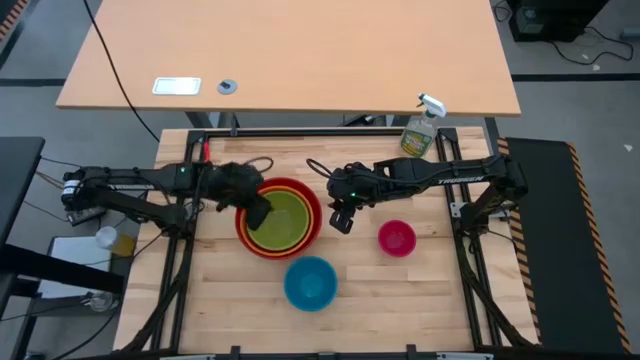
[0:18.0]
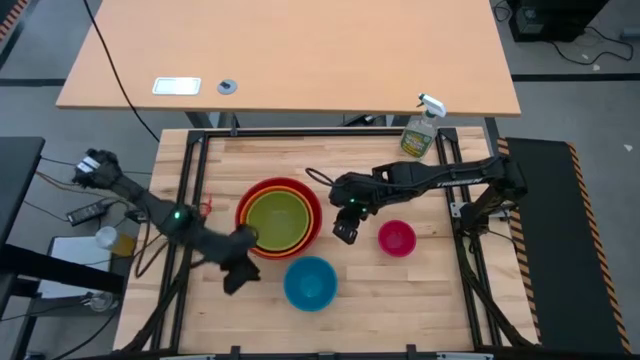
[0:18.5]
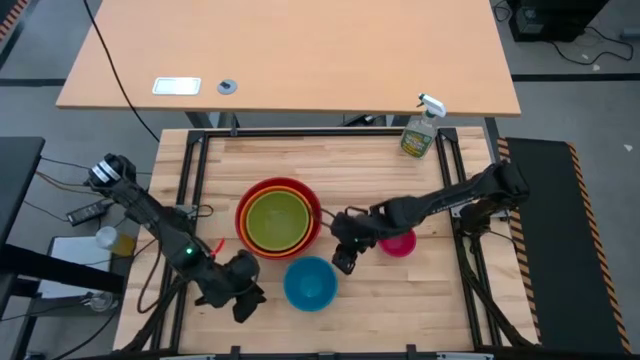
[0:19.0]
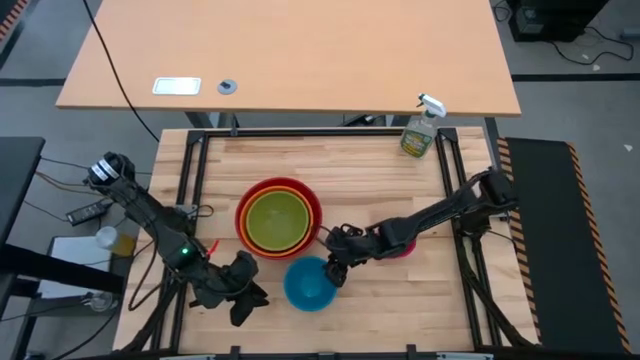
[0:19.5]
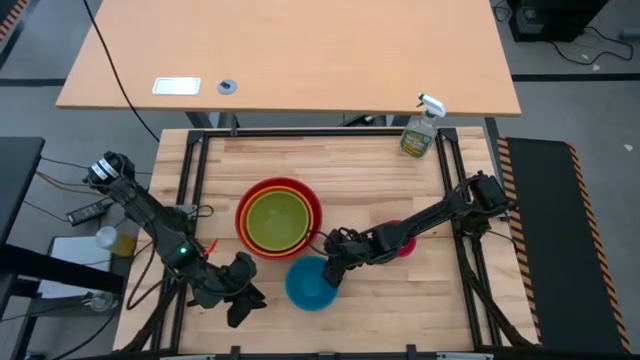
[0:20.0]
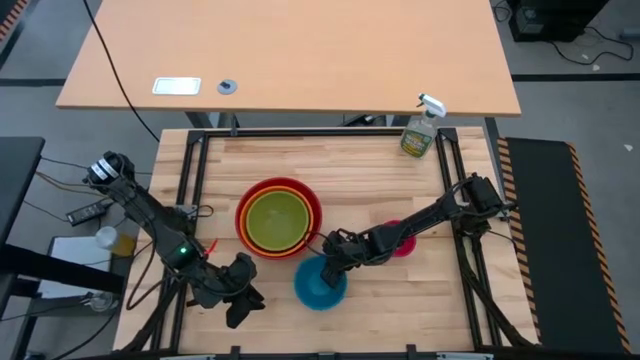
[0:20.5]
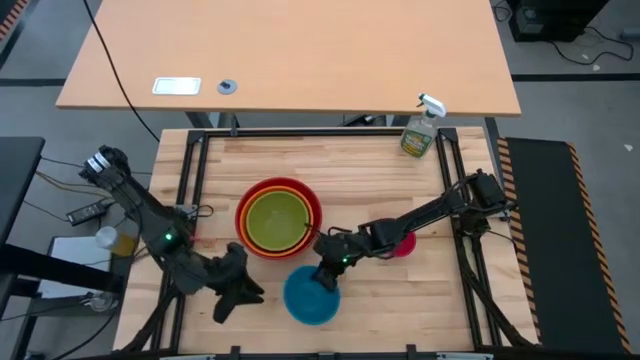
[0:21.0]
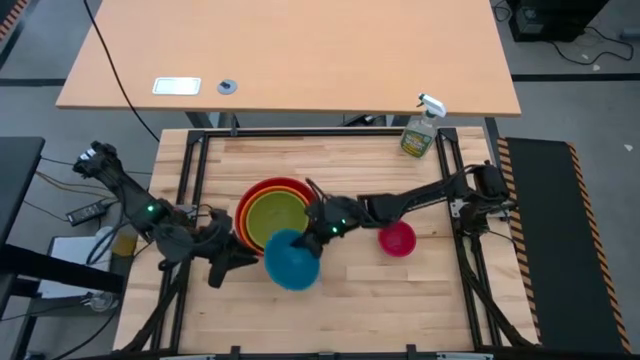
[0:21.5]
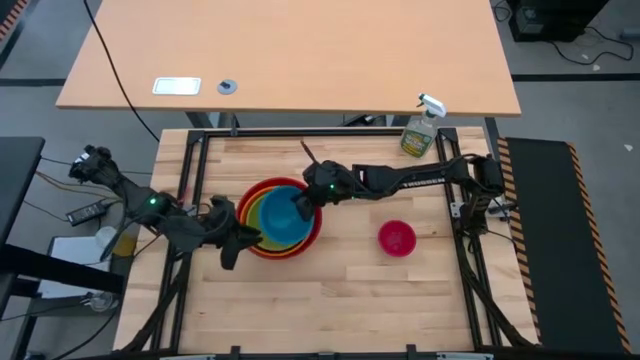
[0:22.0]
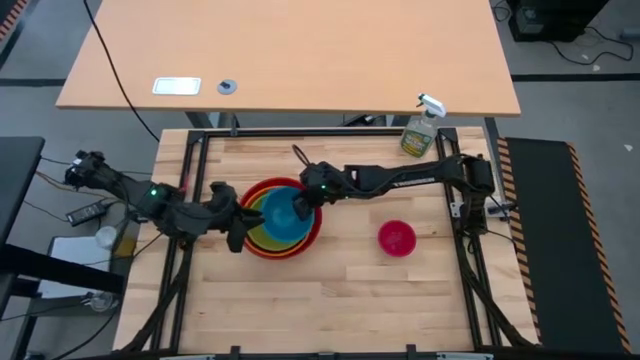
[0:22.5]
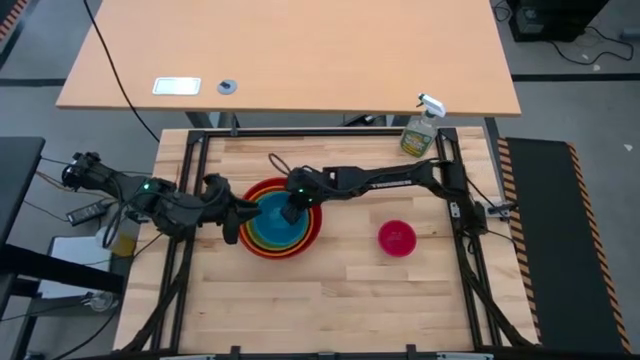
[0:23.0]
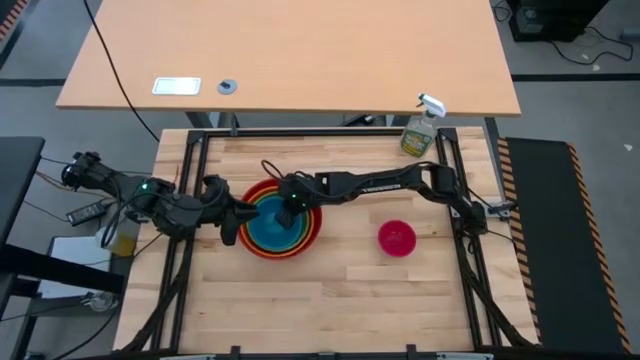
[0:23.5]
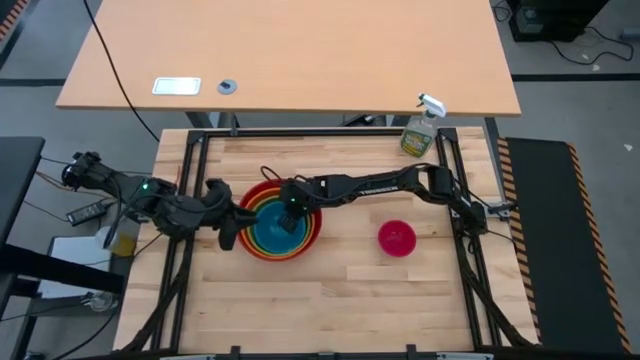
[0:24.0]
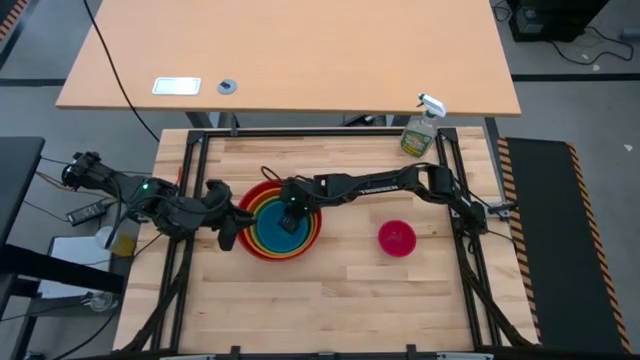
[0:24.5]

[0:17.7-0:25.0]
Stack the blue bowl on top of the green bowl

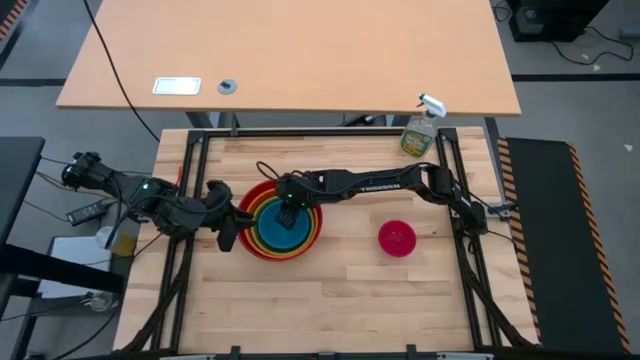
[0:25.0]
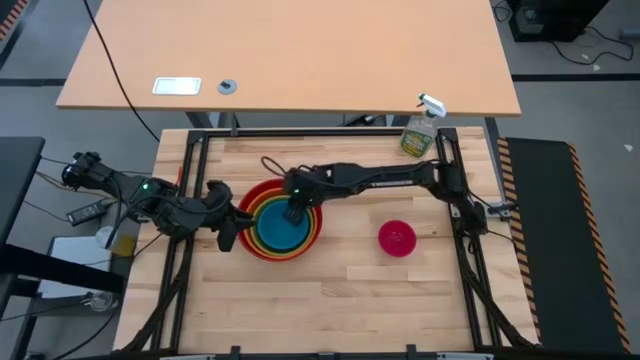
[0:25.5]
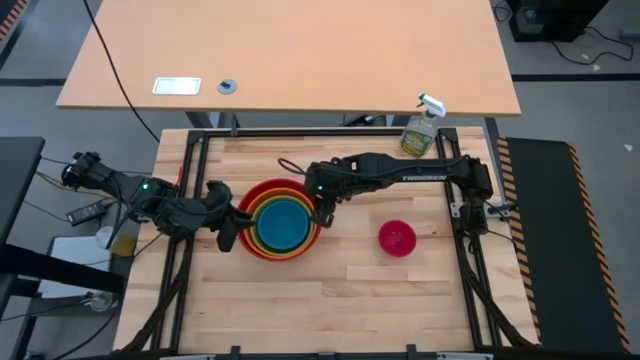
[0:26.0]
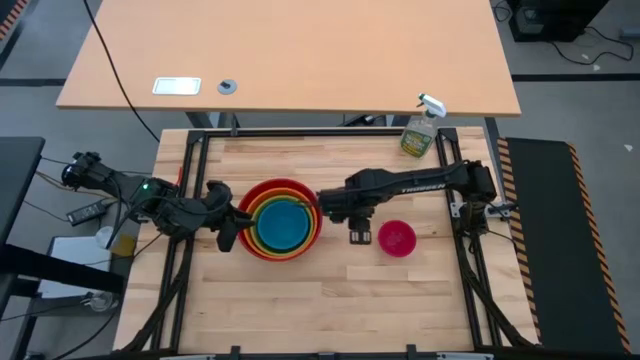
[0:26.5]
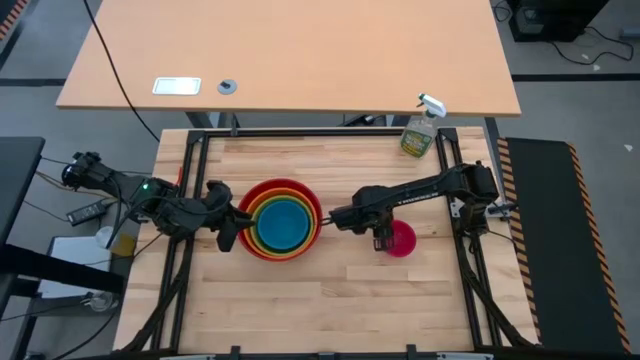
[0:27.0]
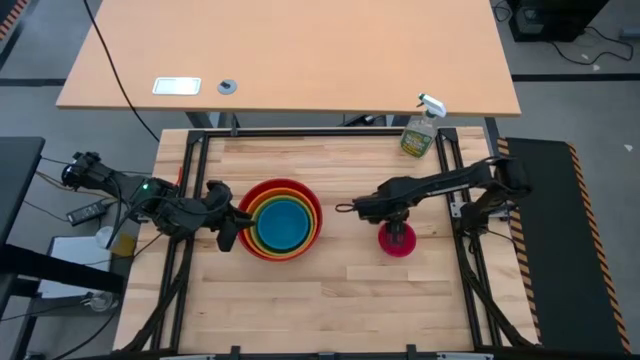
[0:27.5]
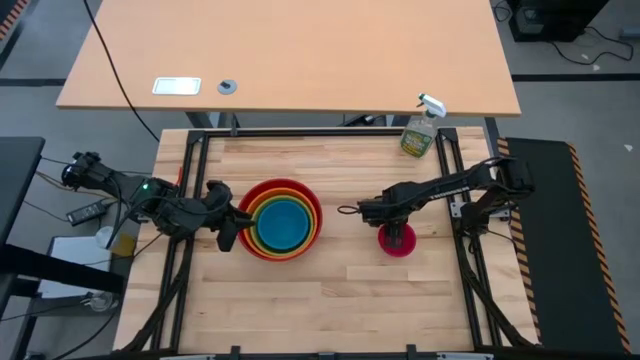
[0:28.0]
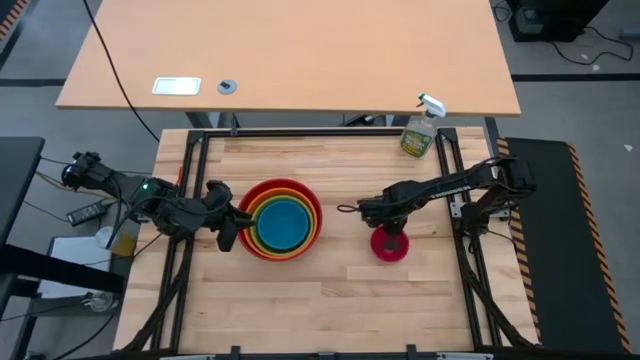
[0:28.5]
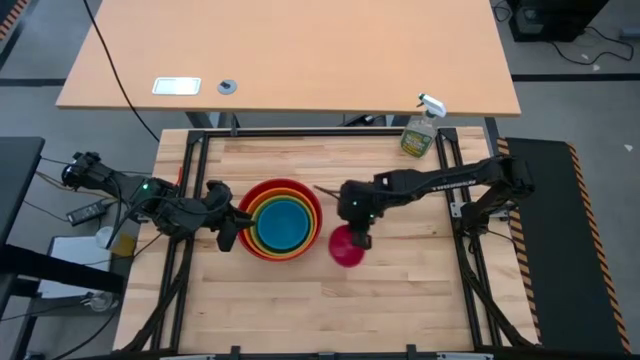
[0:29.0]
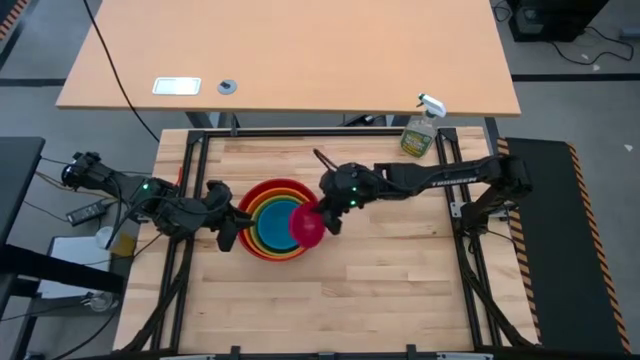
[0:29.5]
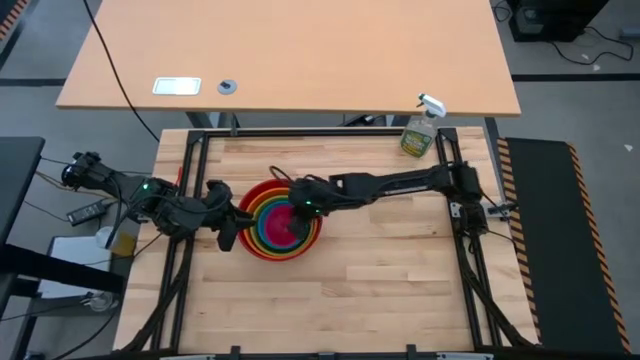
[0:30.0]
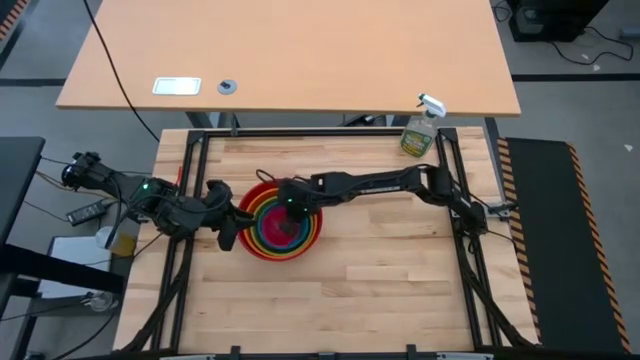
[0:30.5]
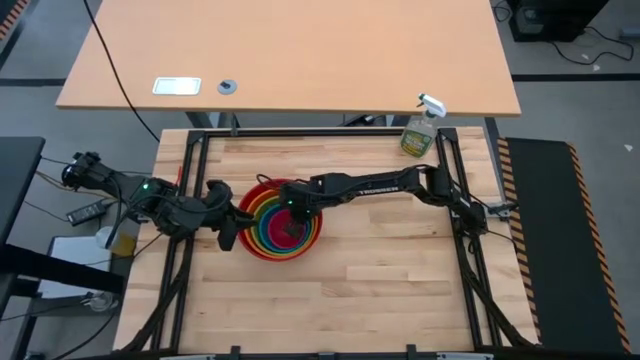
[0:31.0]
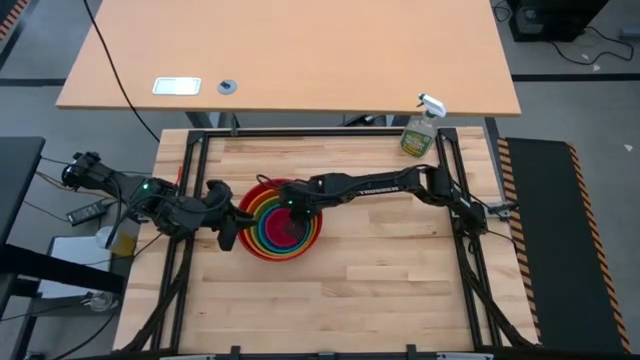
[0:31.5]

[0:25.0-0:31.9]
Stack the pink bowl on top of the blue bowl

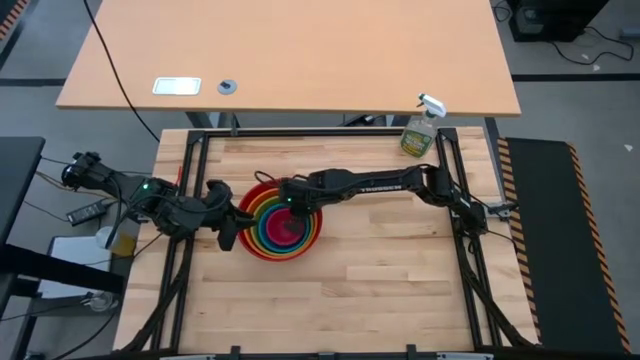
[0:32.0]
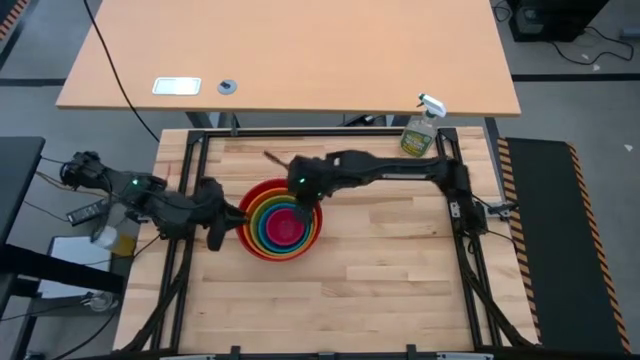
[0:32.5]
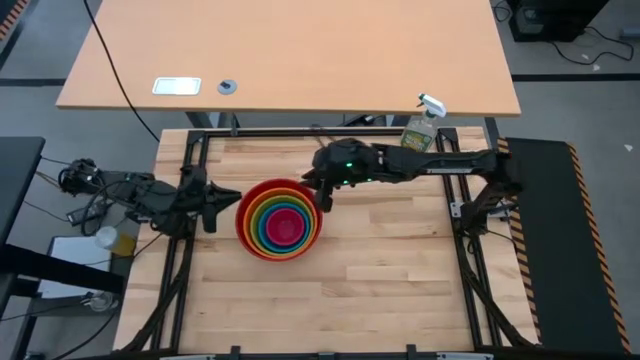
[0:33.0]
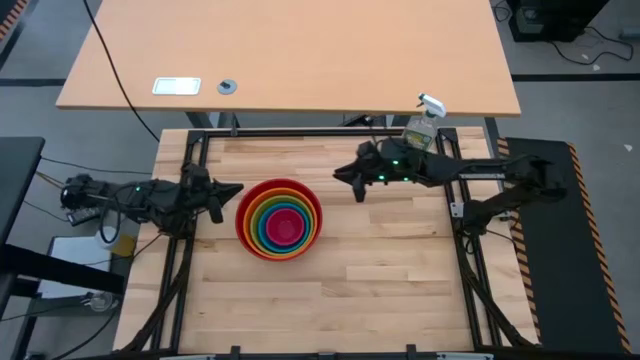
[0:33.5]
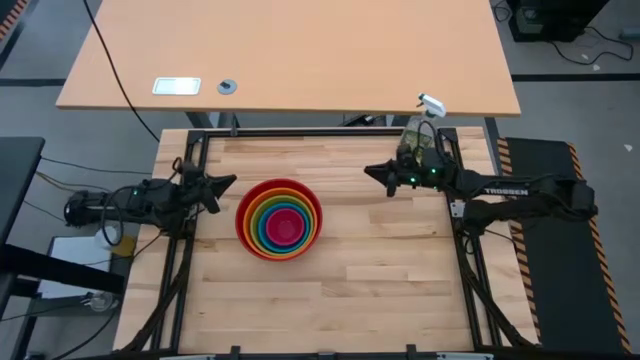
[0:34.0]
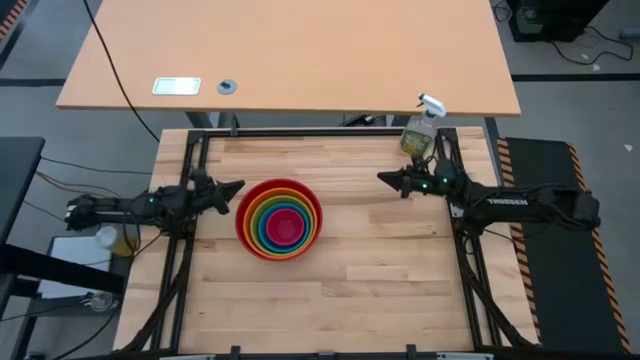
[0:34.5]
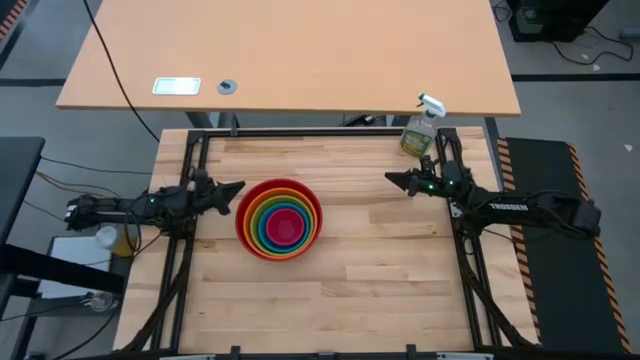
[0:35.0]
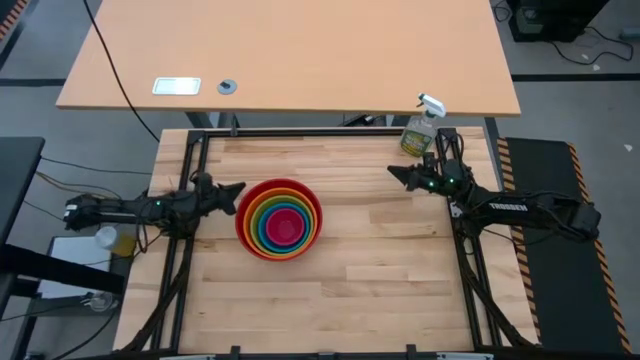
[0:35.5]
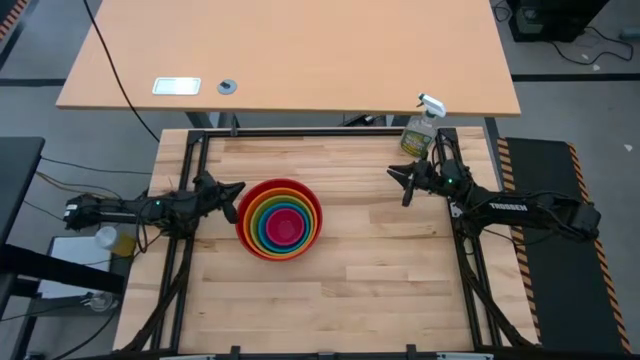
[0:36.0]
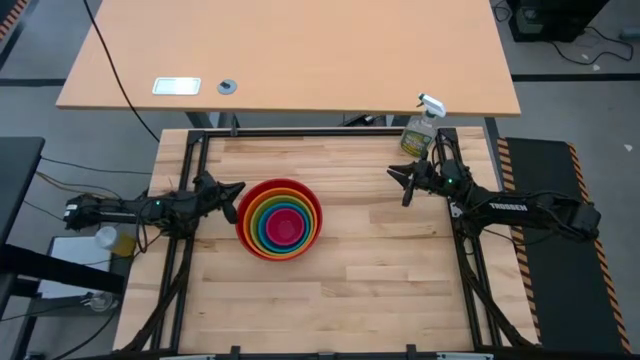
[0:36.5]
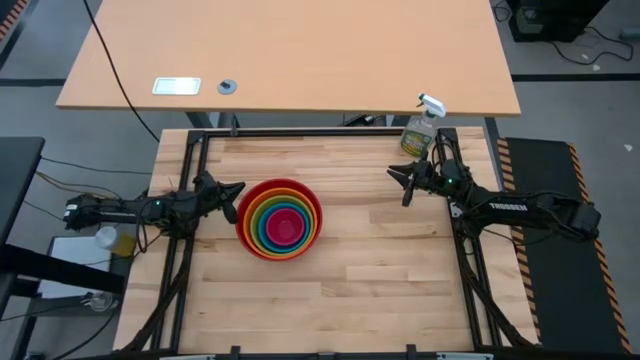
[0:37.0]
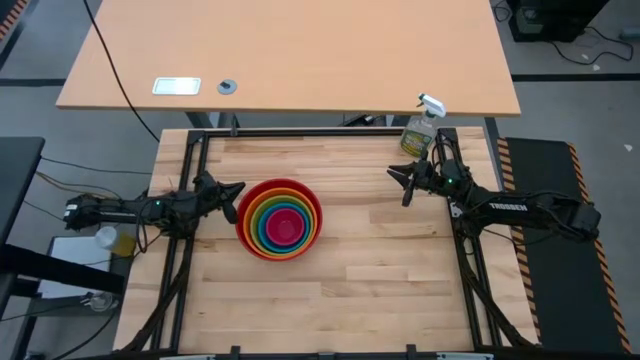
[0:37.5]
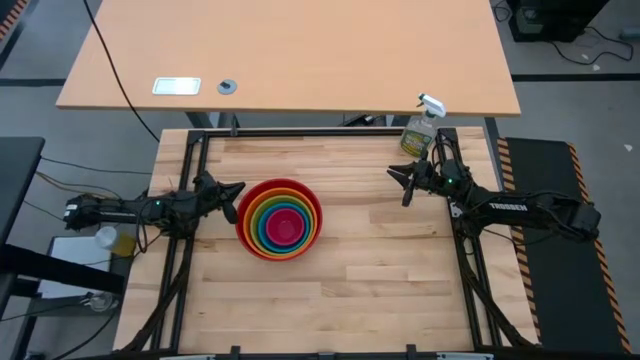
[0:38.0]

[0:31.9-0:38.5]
Return to Home Position
